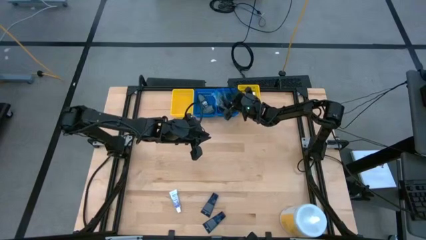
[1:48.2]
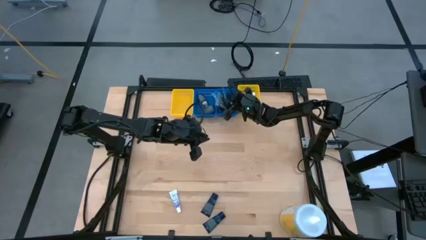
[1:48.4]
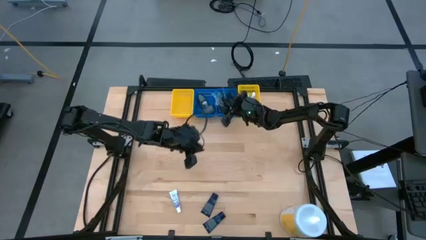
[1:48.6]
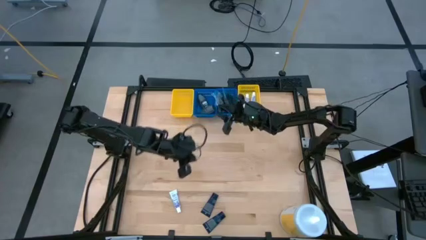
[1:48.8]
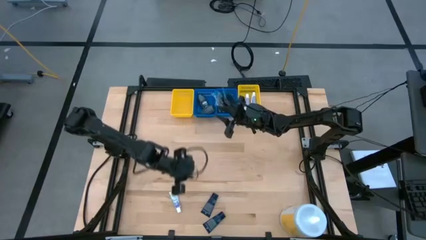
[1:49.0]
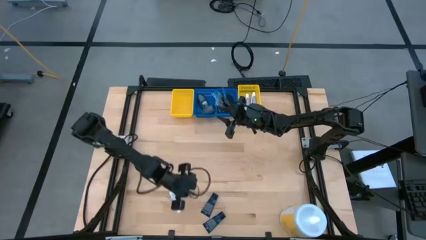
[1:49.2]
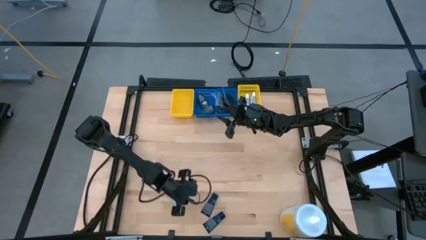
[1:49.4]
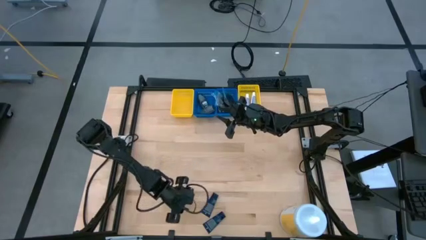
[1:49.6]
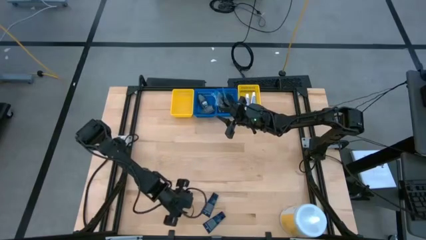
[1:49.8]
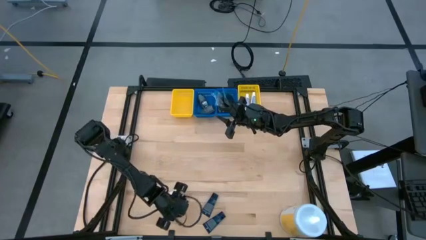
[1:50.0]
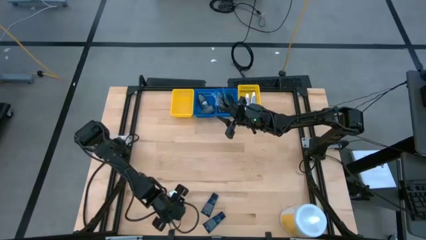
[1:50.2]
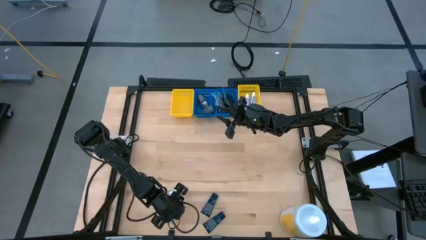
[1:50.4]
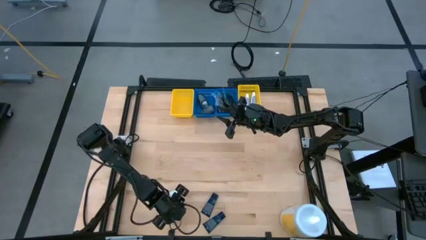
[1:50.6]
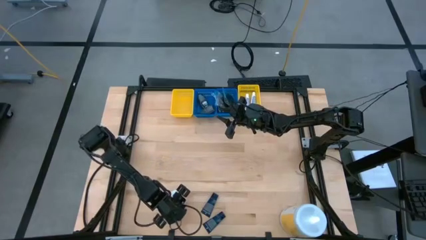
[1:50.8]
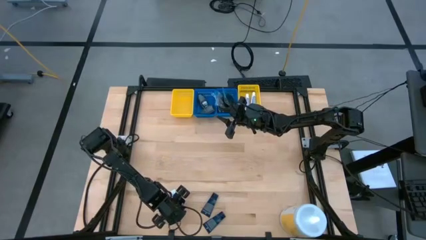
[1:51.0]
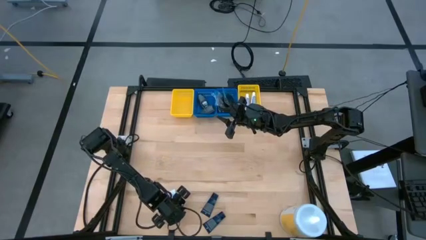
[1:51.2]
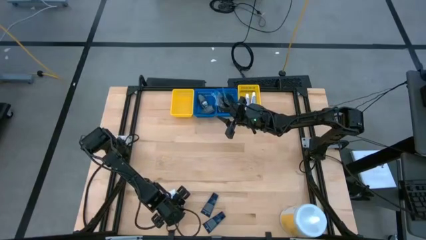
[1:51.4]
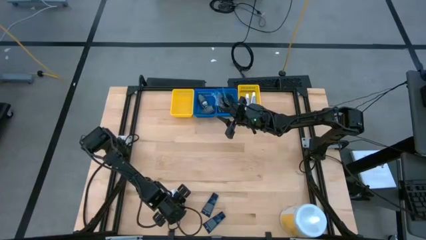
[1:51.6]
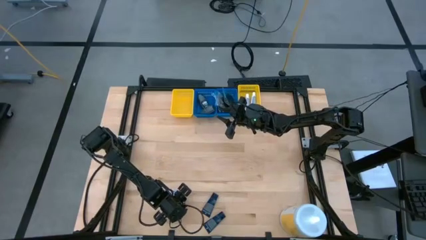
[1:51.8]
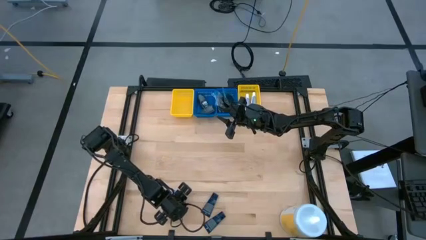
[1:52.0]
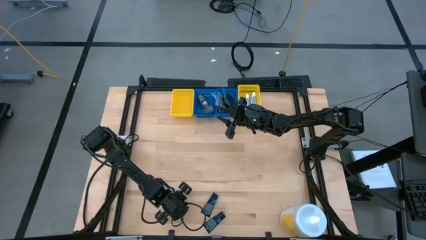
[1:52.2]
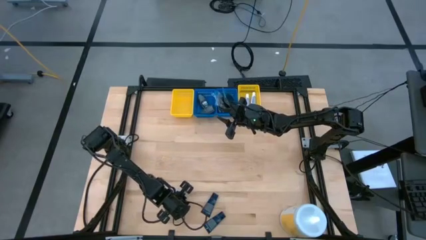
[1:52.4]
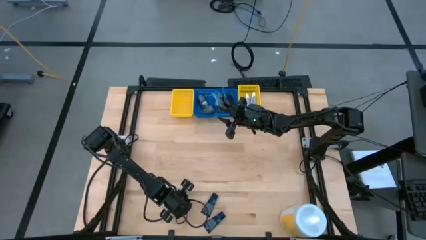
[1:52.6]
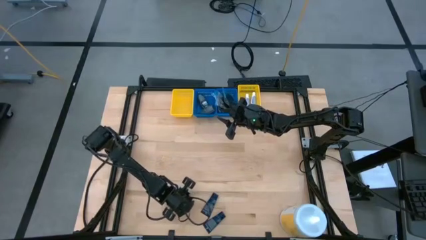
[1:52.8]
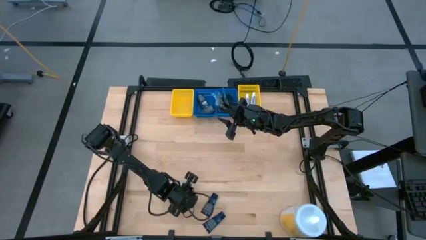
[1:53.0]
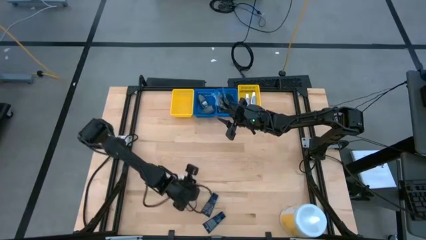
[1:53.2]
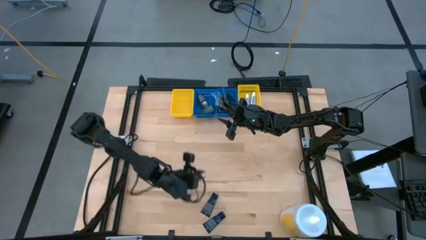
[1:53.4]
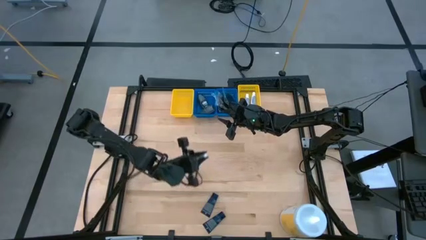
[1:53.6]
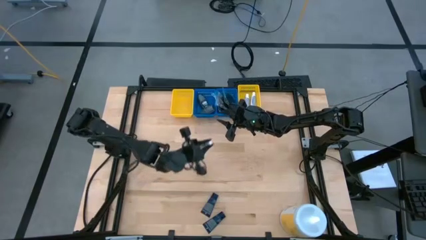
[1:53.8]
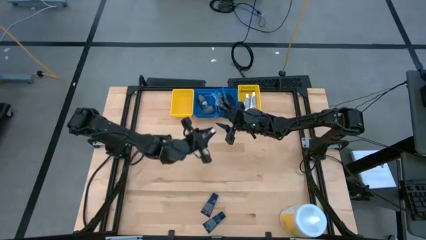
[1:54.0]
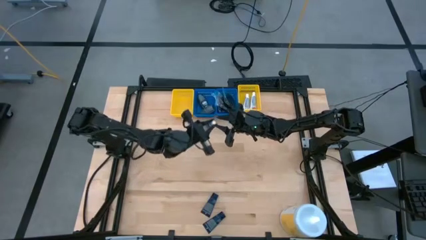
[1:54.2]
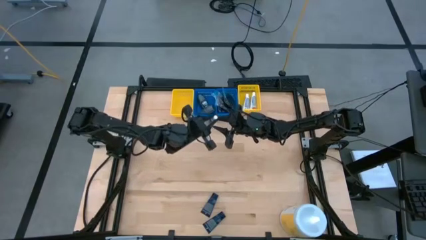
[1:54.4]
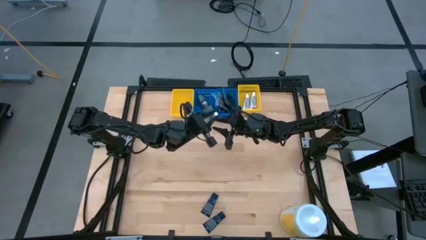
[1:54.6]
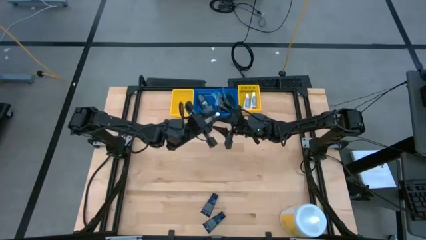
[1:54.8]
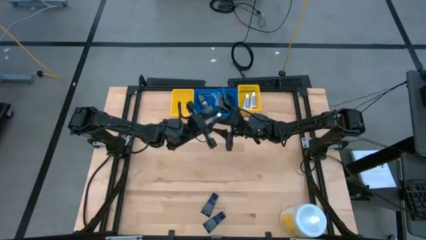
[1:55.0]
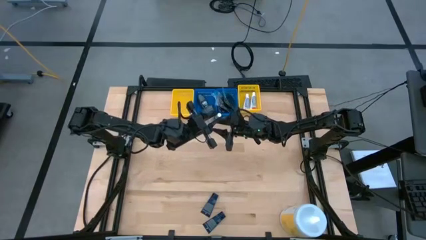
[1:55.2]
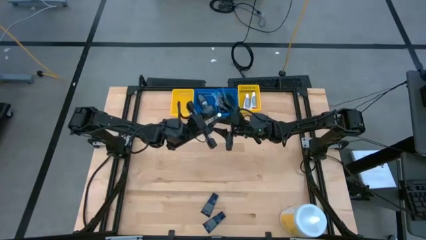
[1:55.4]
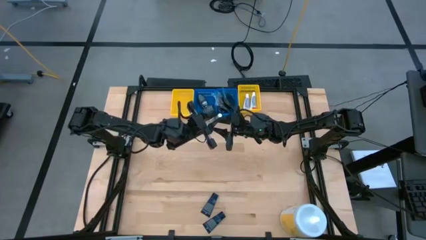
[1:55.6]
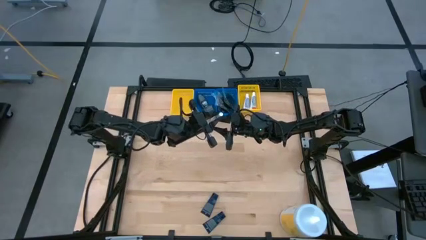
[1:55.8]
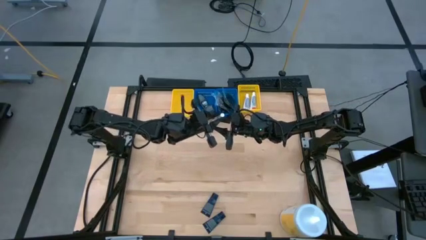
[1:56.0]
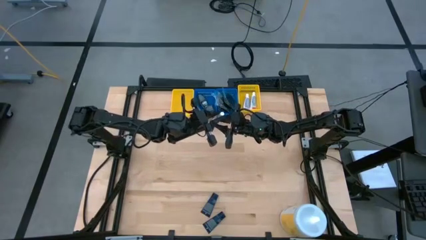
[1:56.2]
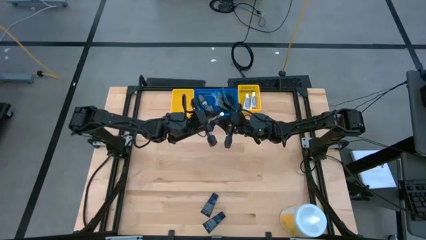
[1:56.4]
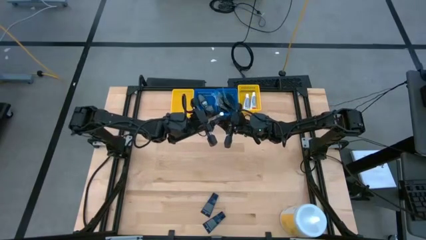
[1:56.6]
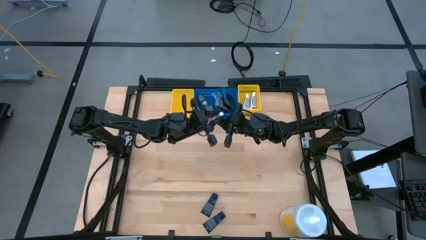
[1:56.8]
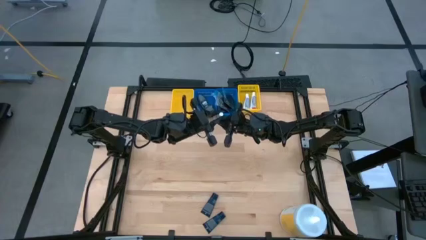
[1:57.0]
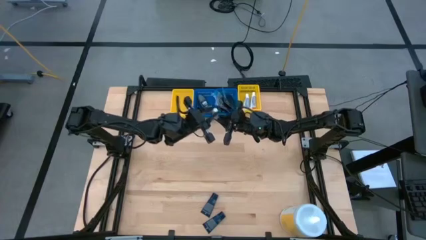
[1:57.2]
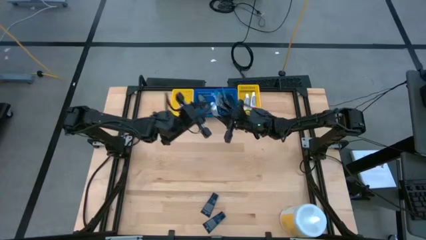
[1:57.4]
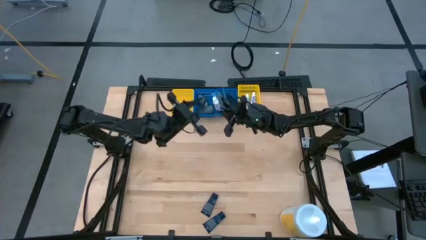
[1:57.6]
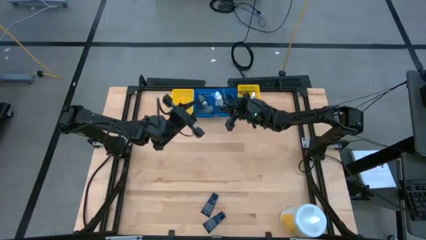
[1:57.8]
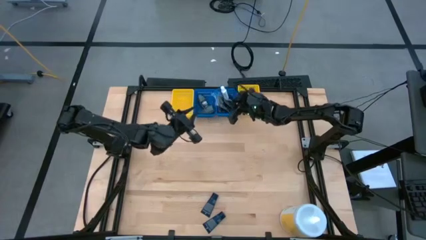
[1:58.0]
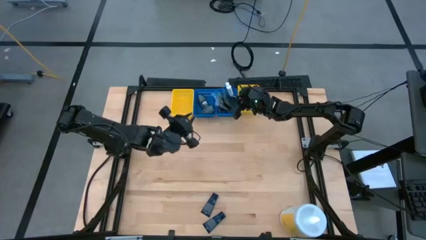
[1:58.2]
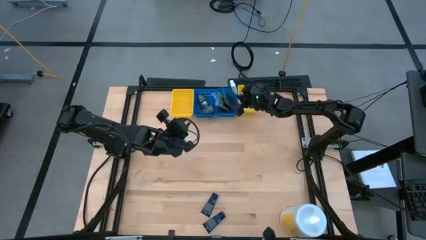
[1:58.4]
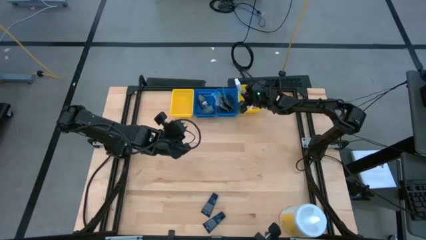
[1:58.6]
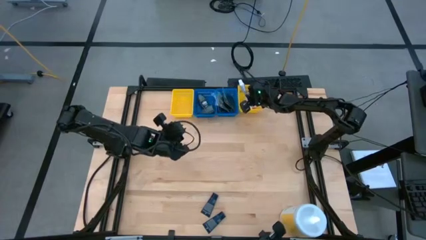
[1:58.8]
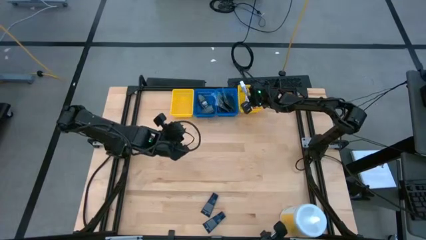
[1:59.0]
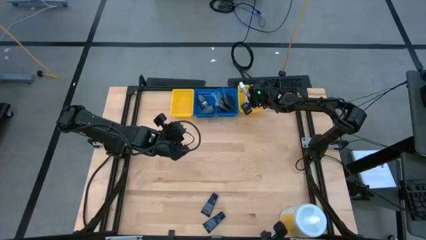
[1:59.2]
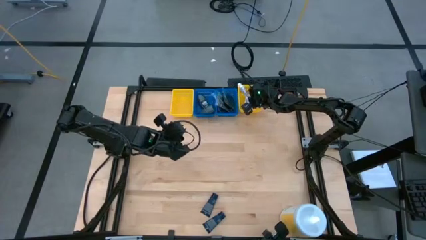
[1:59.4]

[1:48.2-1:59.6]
Task: Pick & Place Travel size toiletries
Put the white toothpaste into the right yellow bin

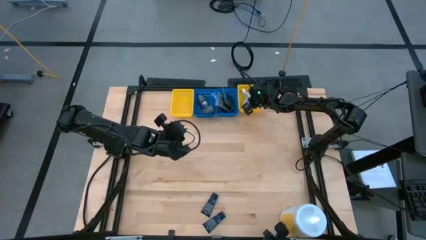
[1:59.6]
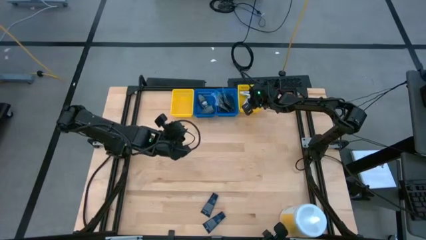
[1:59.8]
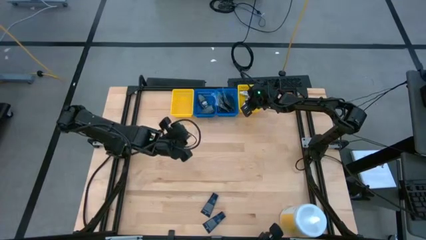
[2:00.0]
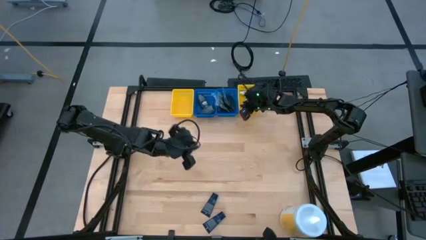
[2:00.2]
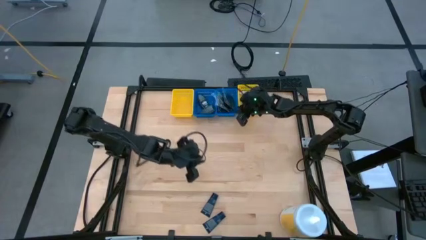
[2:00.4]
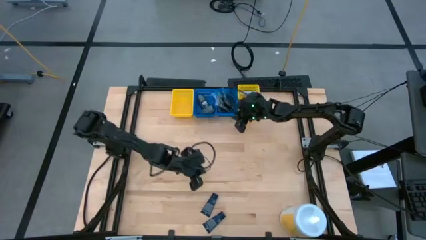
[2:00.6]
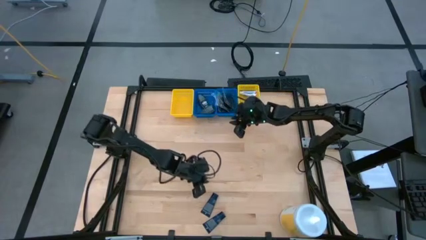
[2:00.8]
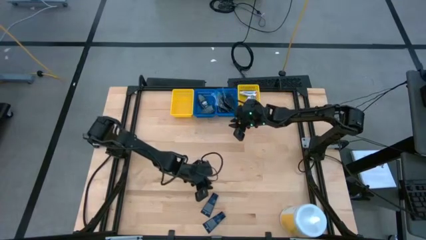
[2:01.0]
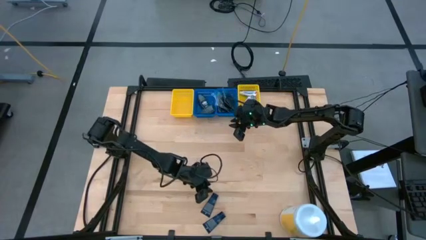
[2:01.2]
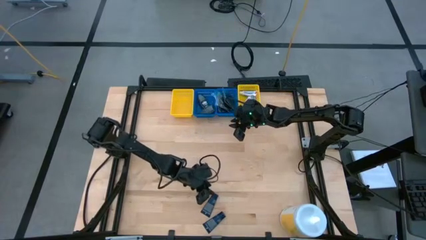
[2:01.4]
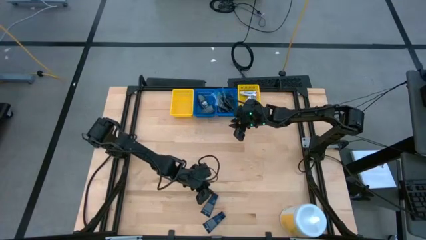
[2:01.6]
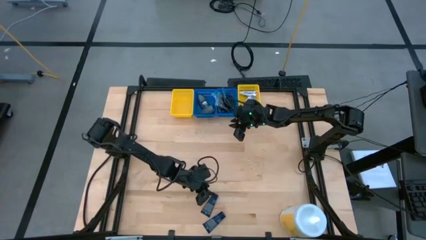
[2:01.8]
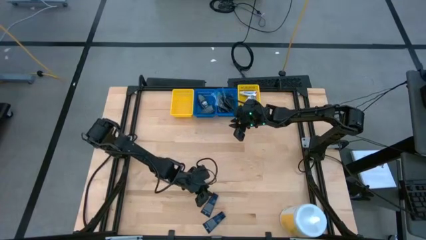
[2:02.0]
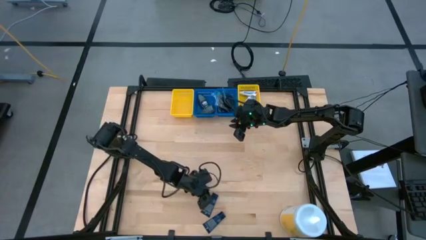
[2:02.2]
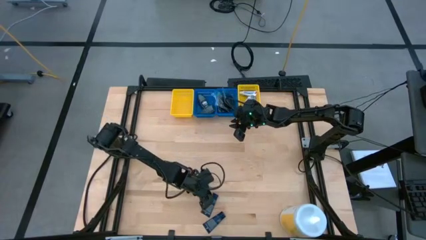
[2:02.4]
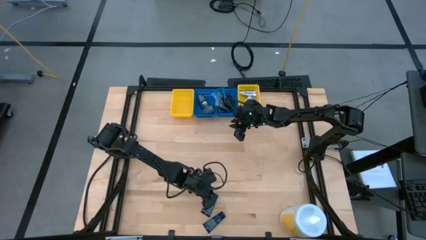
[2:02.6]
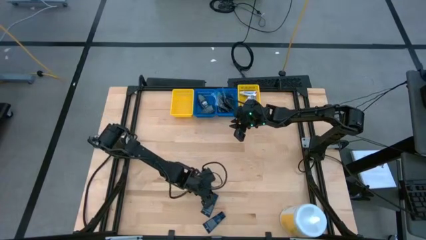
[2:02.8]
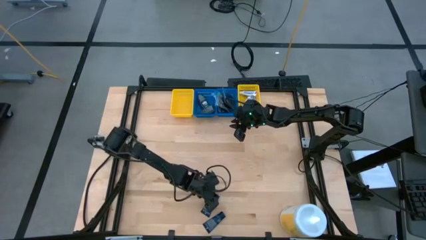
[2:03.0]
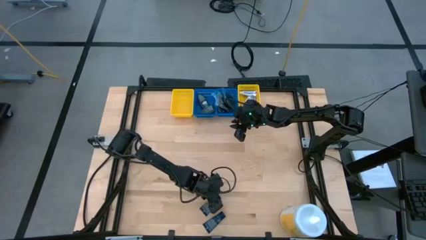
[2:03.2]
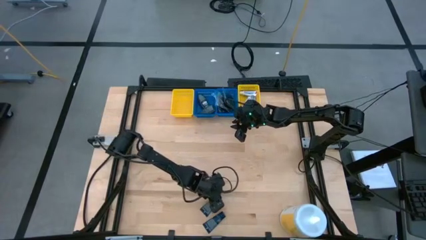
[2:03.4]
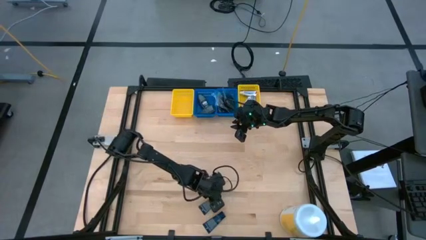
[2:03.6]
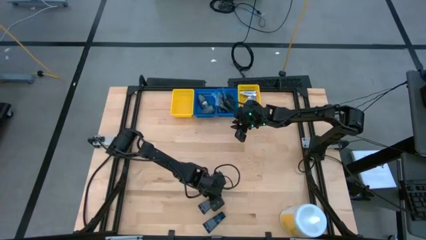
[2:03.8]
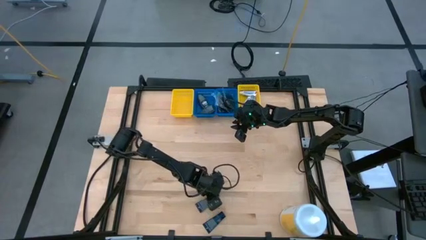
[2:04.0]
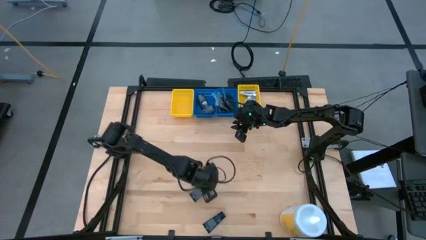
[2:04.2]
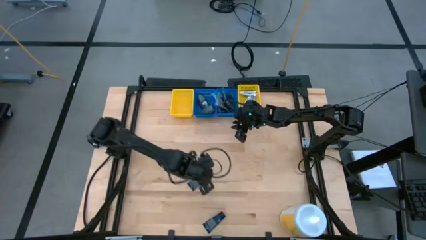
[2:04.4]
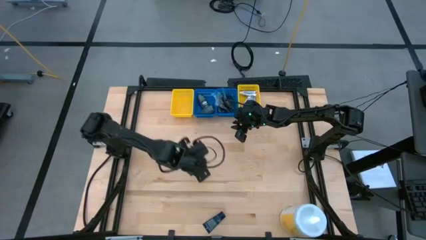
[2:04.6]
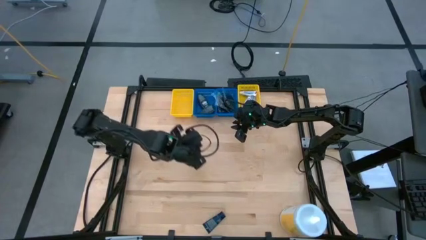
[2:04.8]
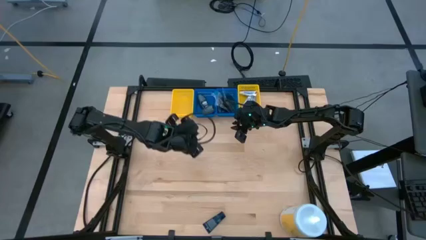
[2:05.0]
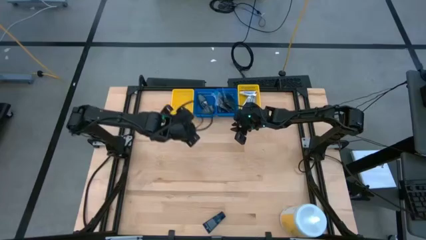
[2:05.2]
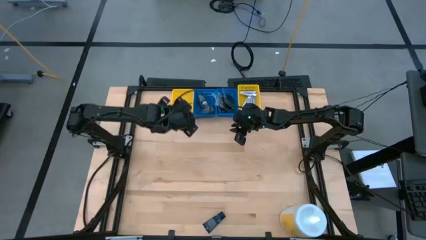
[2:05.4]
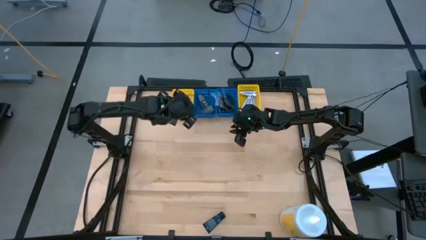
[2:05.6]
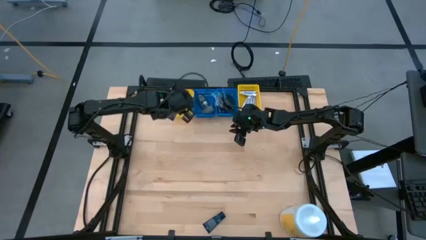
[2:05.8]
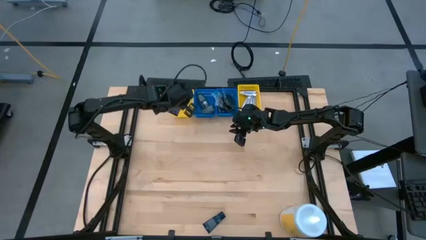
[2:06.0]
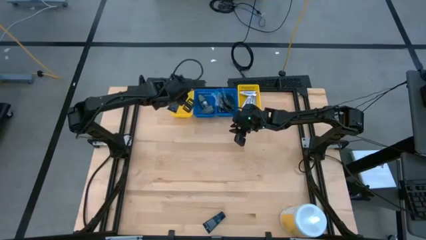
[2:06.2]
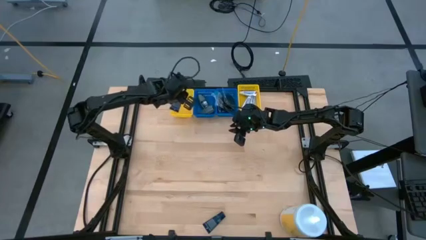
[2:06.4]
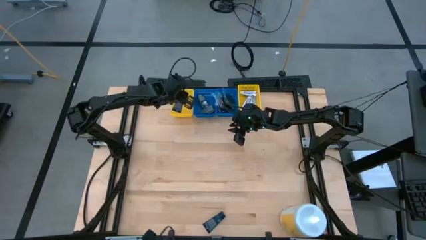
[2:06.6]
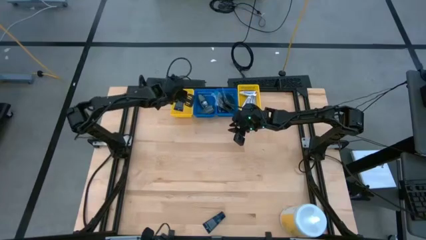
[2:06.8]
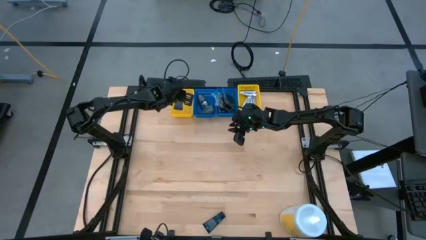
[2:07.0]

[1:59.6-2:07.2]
Put the blue shaving cream into the left yellow bin
